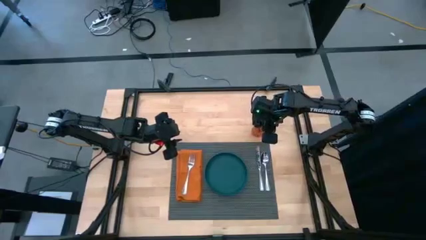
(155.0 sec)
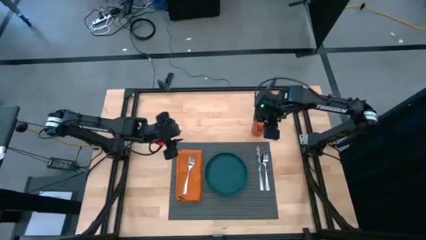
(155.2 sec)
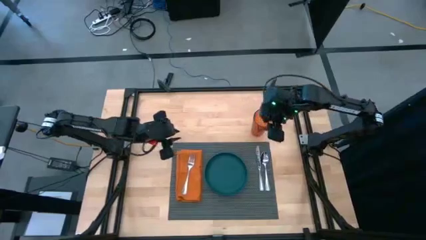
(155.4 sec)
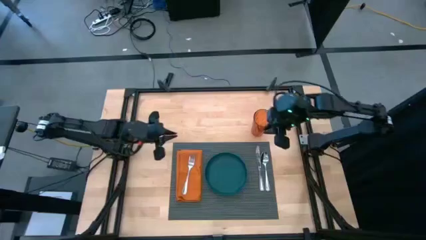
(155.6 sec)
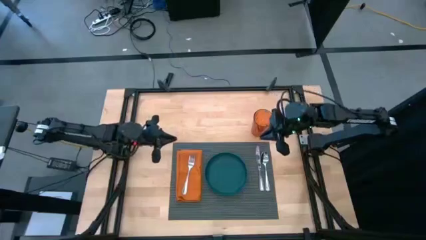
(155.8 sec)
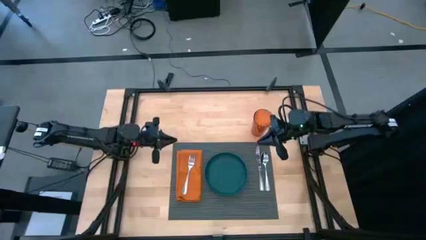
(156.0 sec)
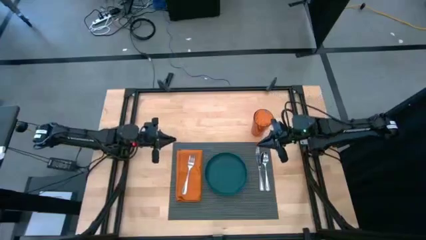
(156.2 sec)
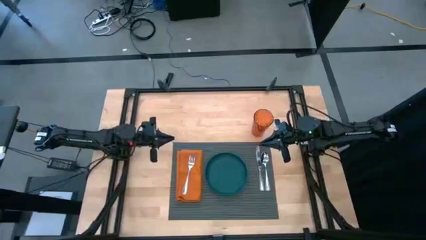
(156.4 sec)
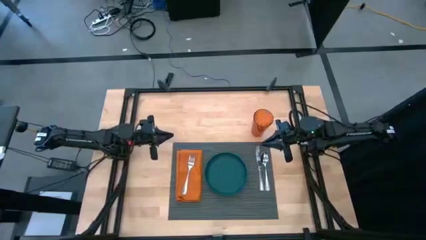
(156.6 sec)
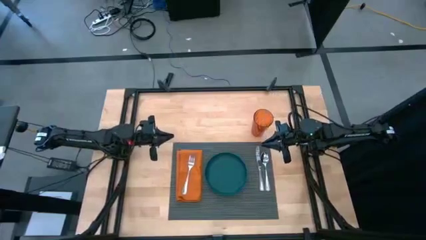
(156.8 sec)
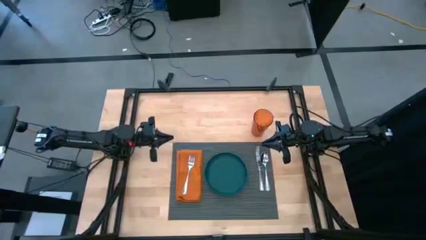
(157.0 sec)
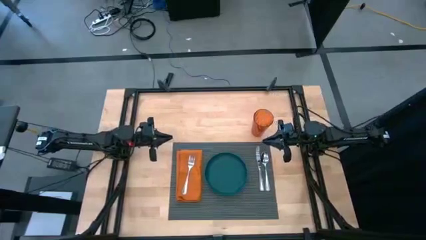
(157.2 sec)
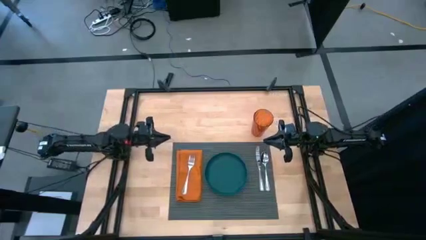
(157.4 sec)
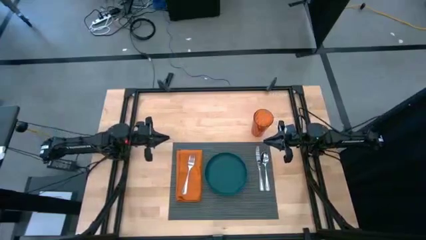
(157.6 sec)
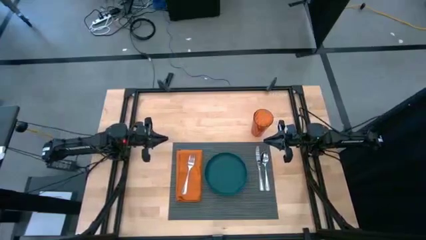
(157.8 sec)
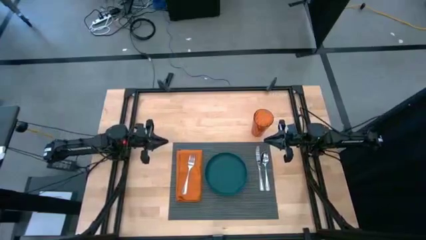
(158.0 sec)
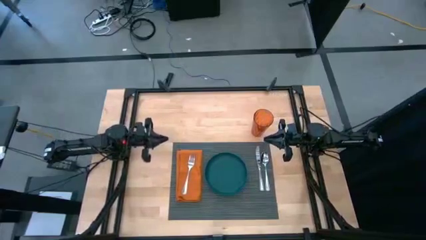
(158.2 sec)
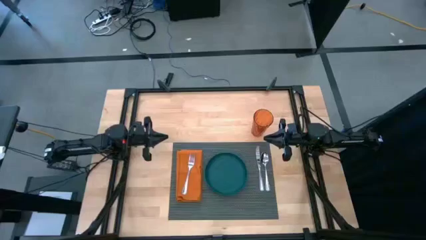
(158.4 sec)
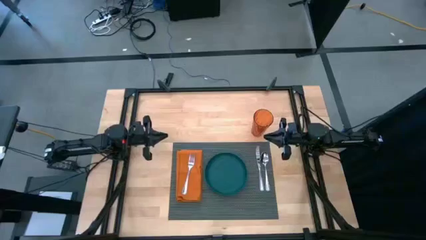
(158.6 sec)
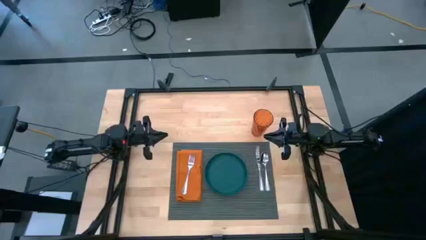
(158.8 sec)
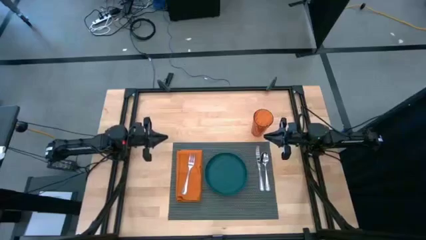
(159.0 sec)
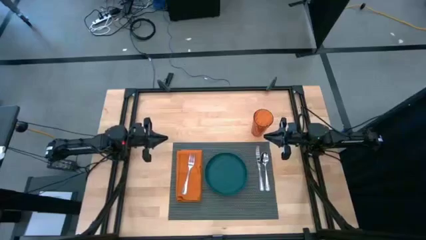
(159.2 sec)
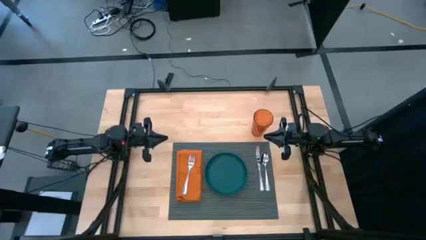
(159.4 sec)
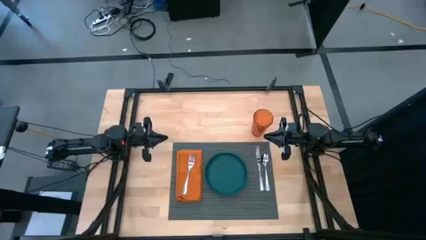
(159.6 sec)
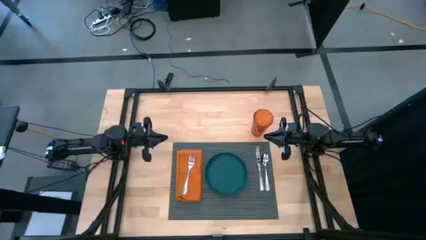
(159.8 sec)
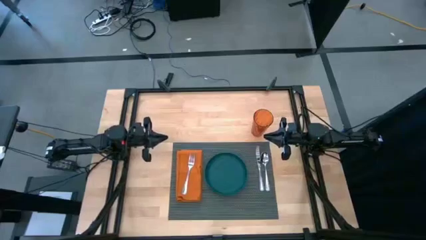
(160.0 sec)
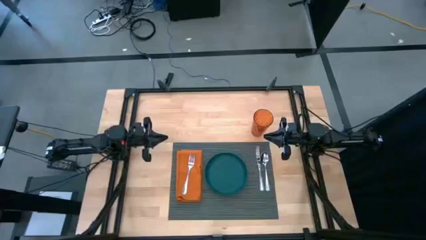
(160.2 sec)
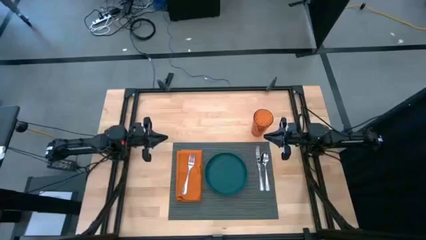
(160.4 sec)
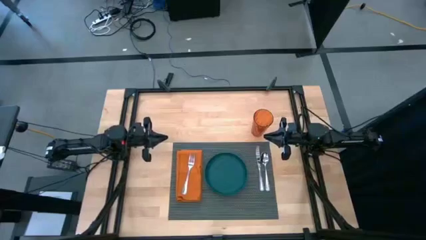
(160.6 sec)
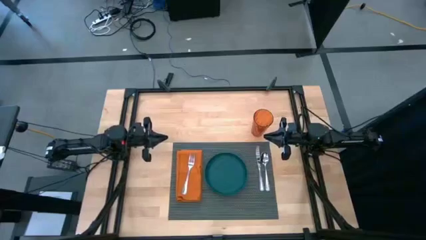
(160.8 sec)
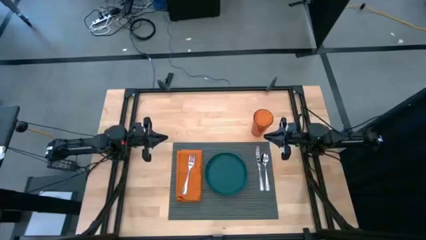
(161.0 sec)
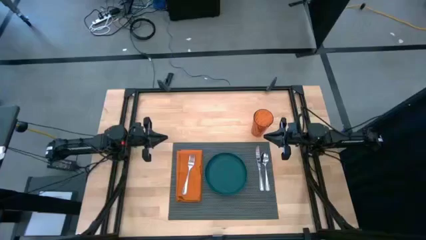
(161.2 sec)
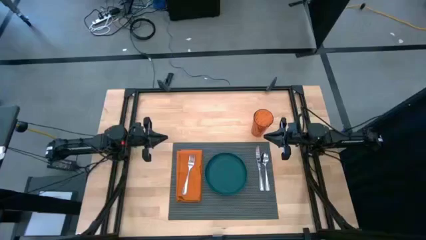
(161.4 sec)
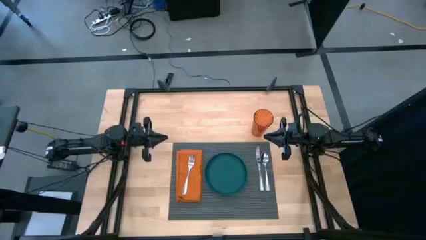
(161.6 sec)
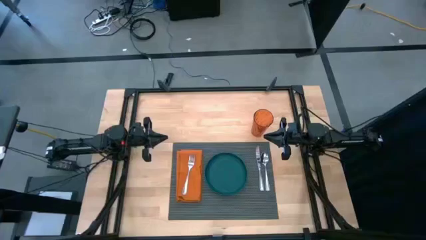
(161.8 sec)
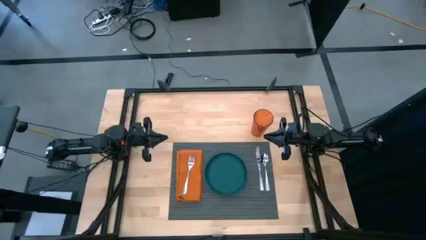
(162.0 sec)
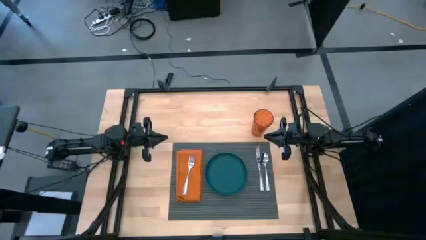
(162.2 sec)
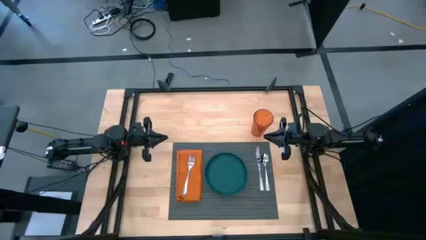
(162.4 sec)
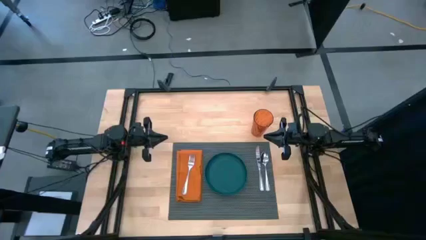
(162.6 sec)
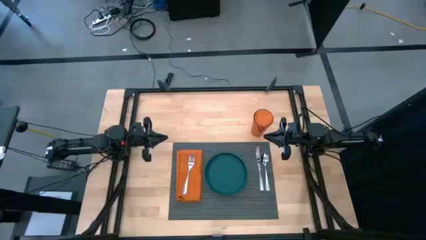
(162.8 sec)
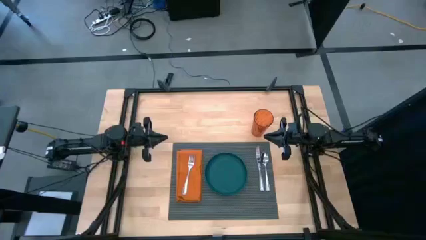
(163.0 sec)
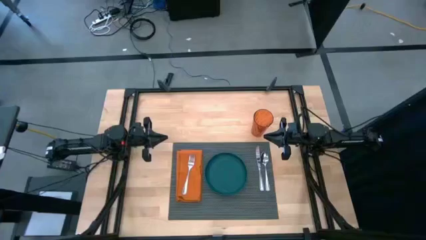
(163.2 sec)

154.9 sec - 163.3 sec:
Task: Set table place
Return to Home Position

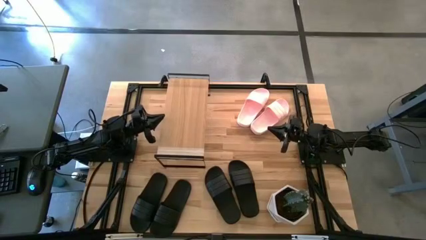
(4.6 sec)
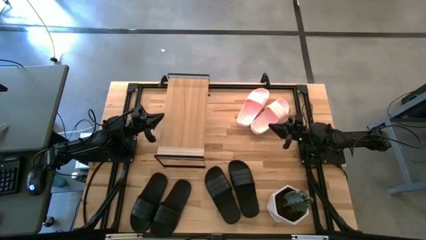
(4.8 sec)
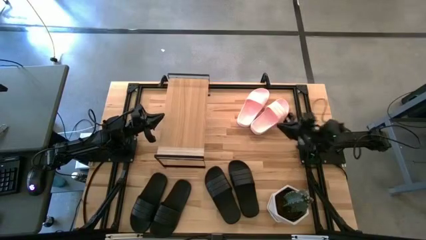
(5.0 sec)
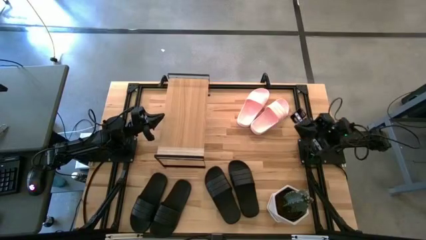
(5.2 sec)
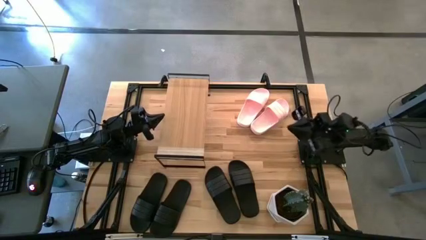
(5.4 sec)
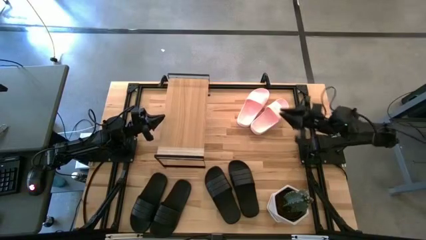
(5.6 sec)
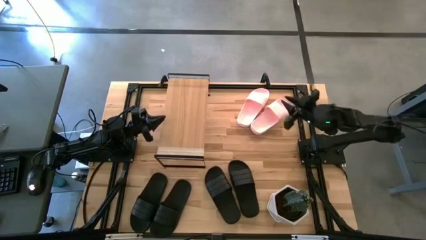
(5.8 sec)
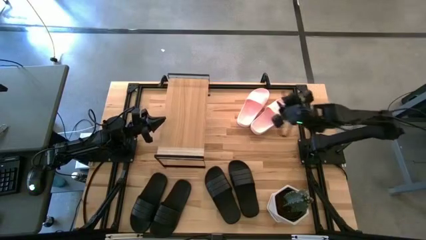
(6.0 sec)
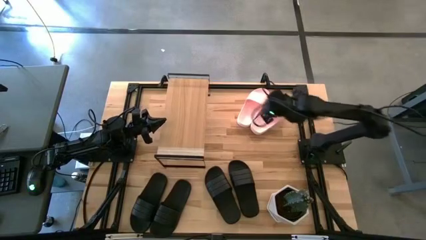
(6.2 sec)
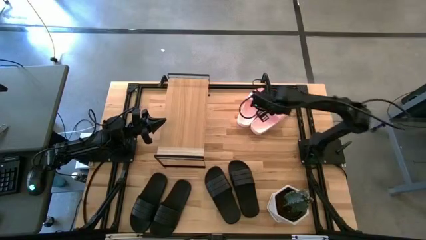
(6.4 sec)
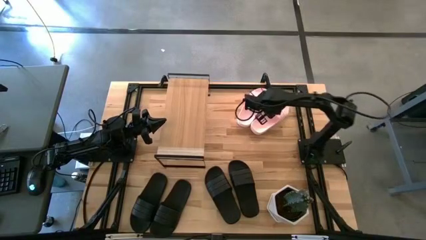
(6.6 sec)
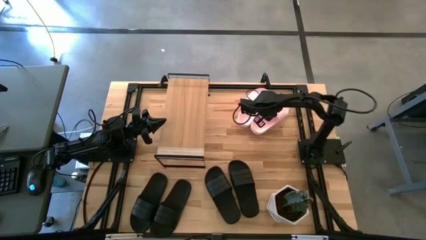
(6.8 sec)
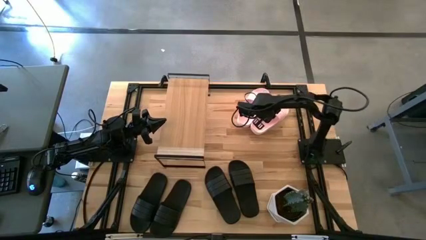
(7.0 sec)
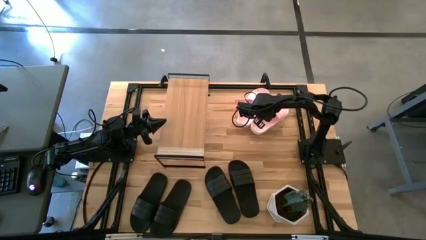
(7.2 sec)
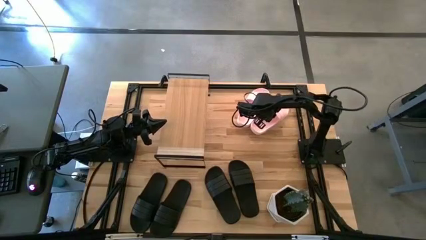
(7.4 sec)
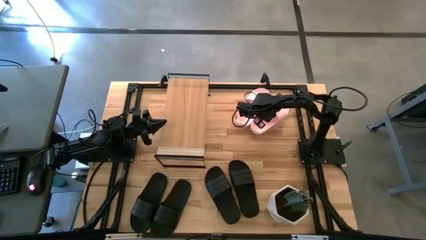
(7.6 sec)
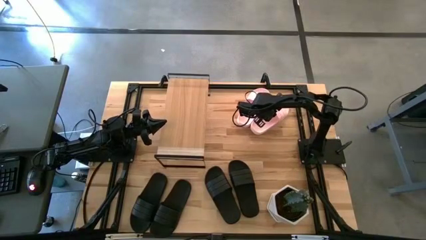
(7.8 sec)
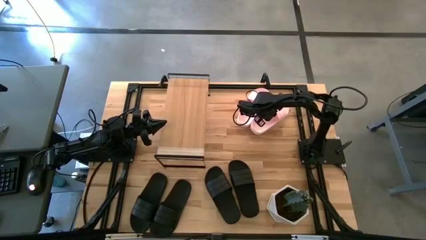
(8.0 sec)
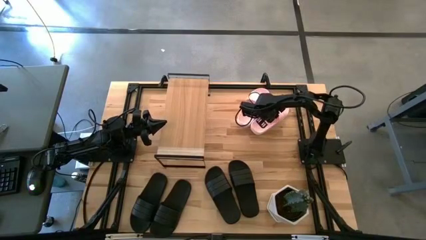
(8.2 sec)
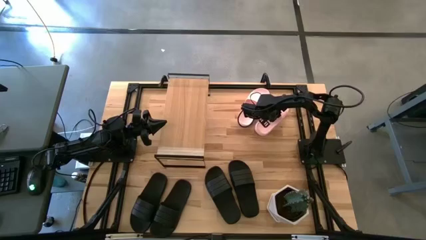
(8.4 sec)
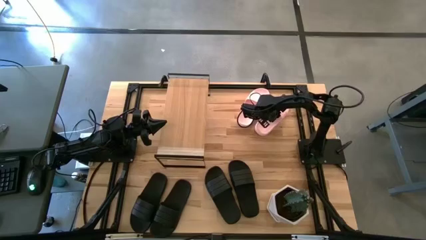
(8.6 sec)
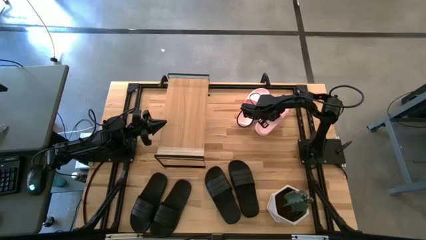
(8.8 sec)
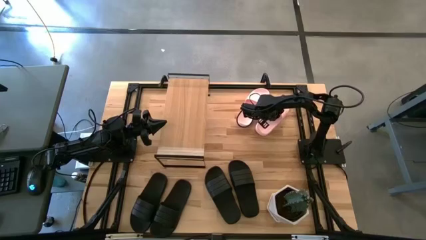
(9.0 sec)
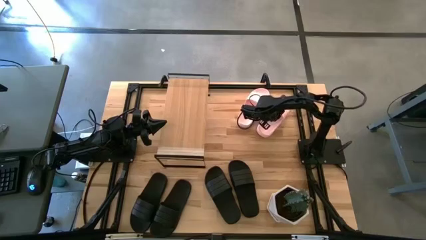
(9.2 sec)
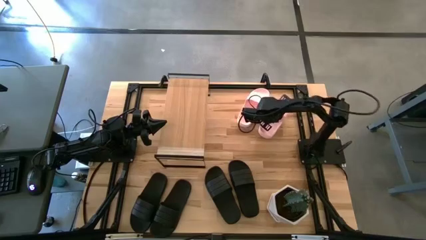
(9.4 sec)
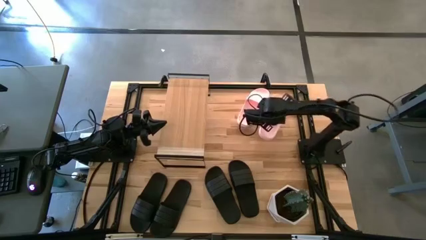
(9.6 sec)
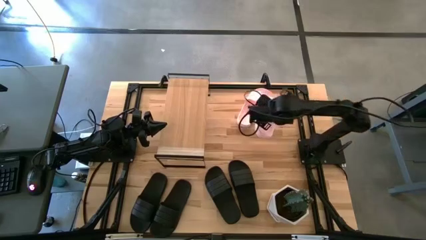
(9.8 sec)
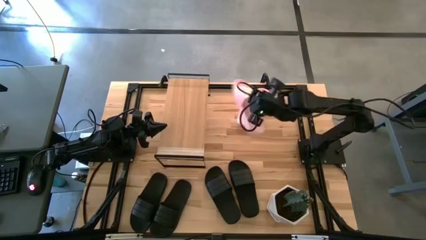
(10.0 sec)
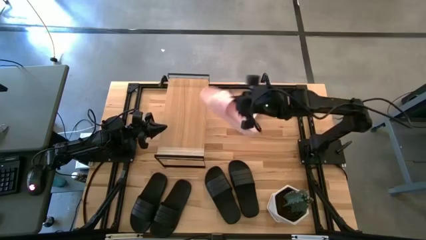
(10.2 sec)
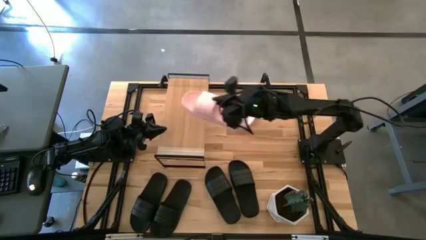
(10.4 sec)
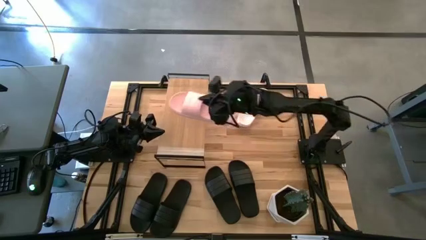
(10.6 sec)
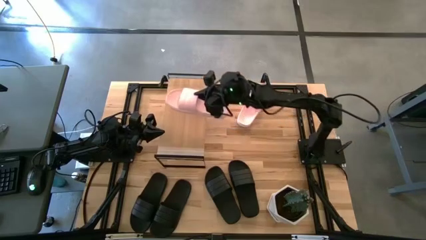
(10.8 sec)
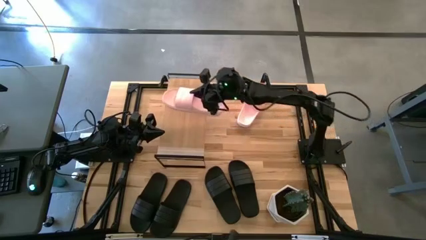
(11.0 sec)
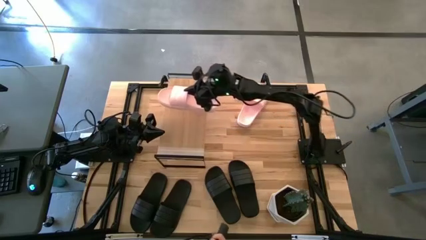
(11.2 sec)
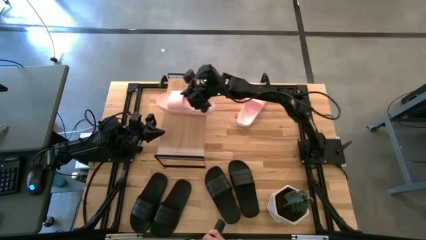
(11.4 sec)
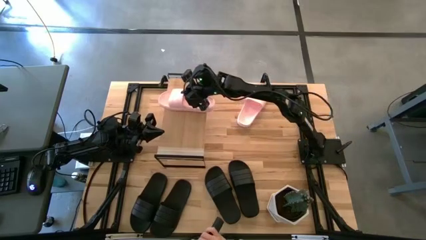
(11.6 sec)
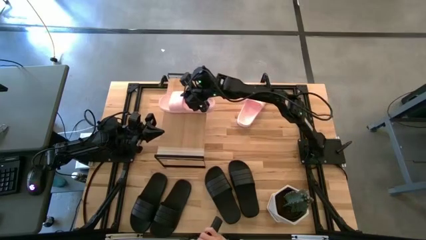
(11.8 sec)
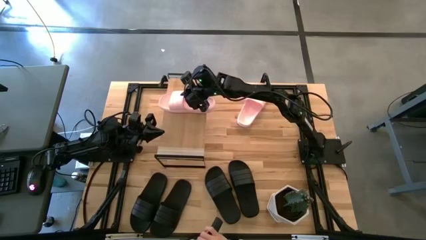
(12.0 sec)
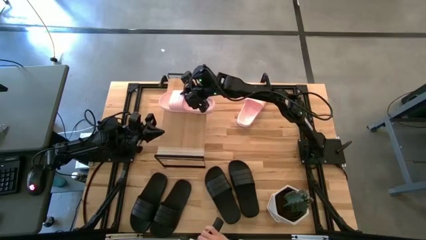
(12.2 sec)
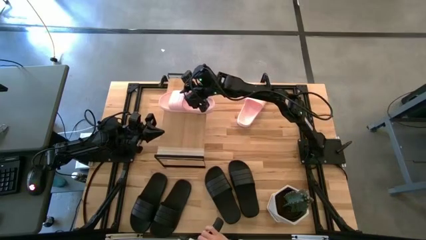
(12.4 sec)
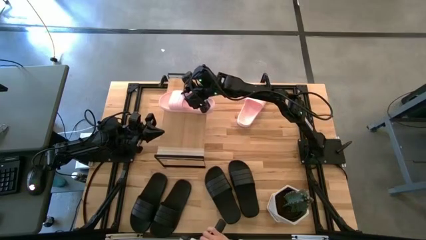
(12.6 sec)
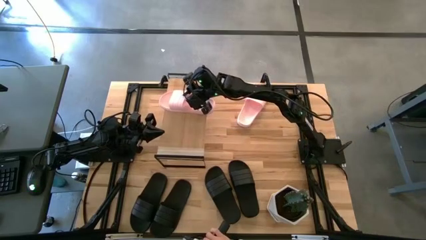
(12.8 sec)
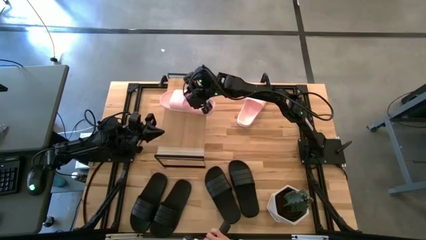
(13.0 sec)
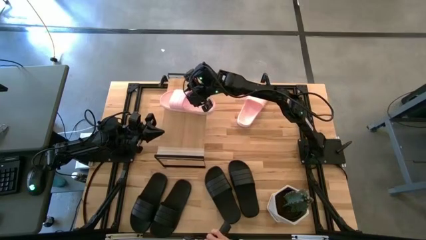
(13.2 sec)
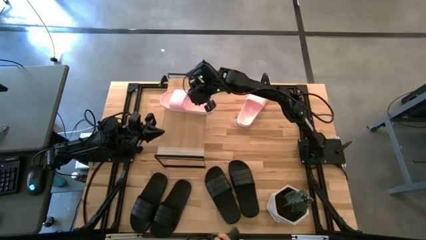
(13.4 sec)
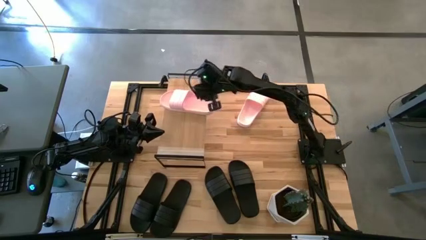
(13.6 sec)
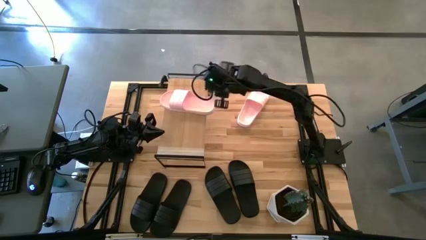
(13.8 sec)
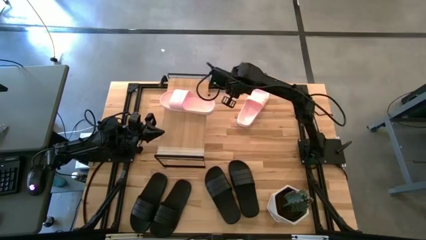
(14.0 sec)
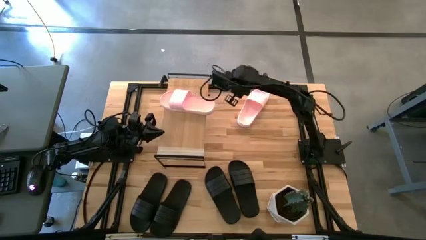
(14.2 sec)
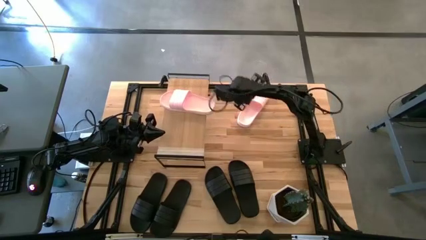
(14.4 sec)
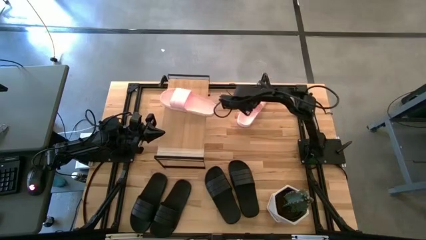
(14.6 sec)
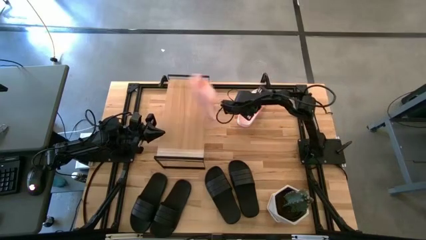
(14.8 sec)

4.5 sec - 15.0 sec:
Task: Pick and place slides into the shelf
Put the pink slide on the shelf
